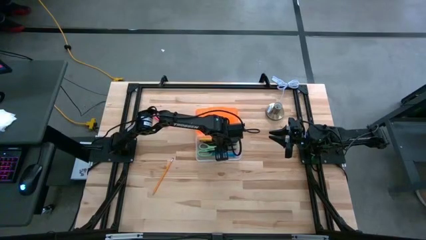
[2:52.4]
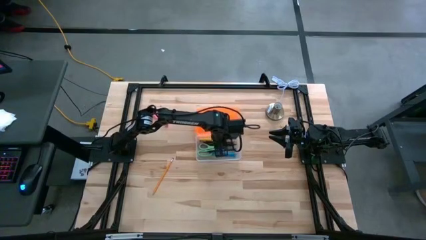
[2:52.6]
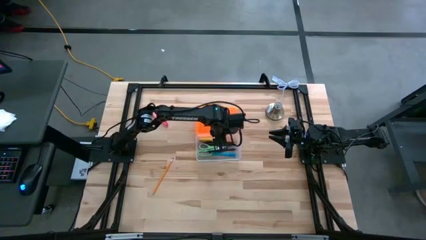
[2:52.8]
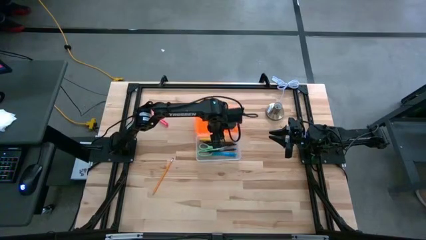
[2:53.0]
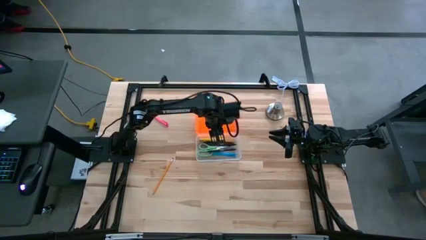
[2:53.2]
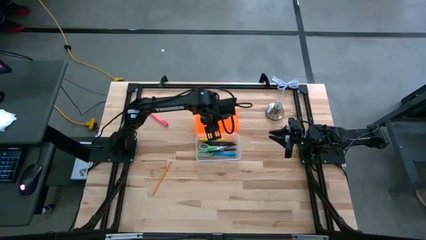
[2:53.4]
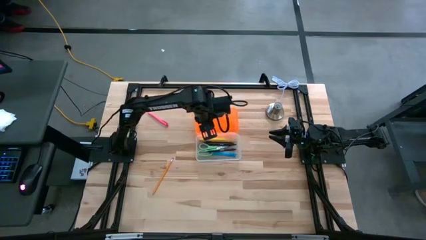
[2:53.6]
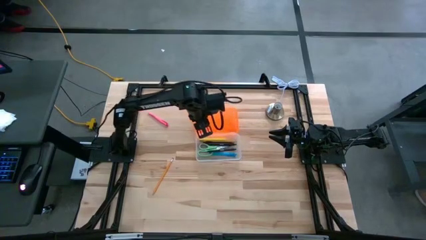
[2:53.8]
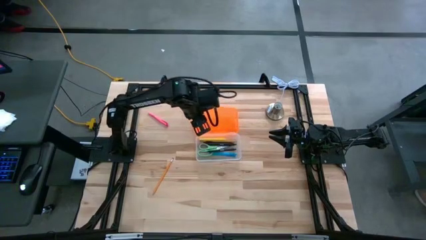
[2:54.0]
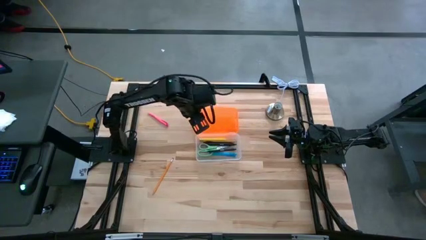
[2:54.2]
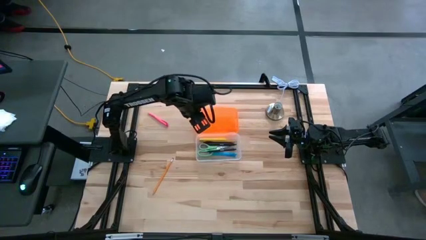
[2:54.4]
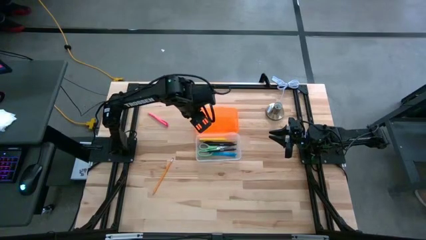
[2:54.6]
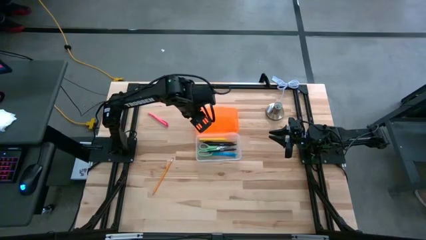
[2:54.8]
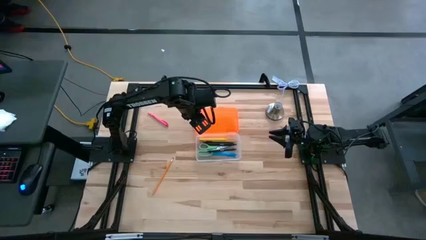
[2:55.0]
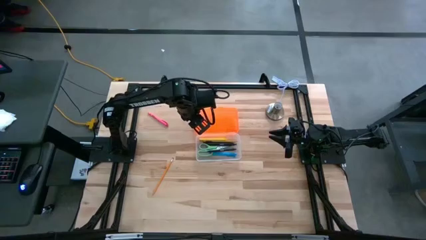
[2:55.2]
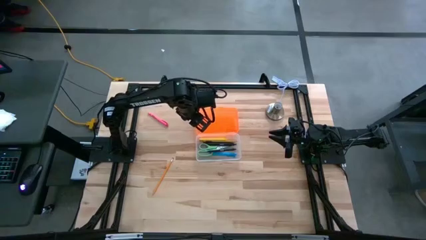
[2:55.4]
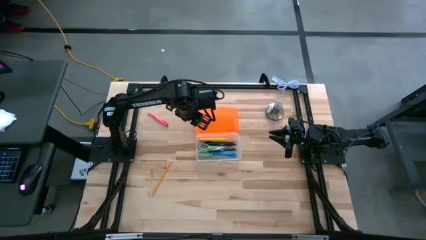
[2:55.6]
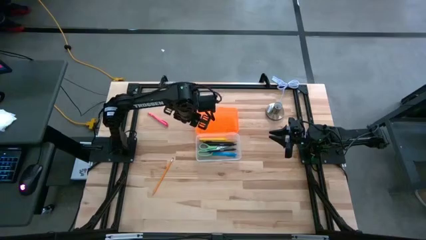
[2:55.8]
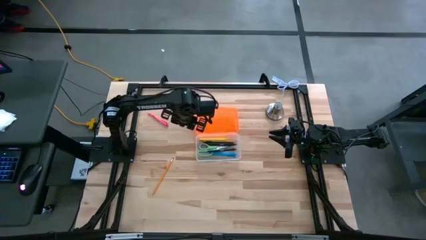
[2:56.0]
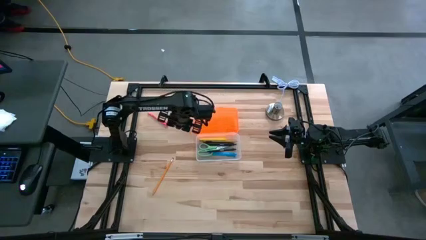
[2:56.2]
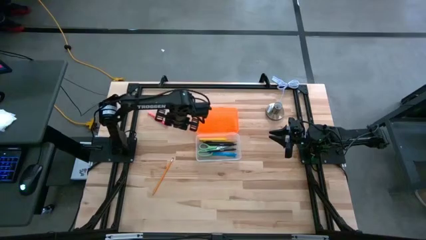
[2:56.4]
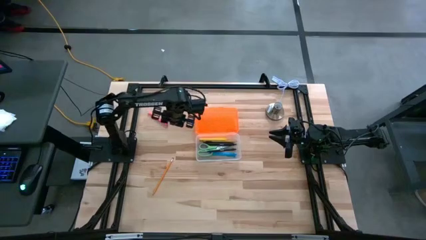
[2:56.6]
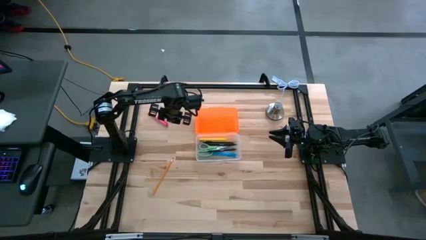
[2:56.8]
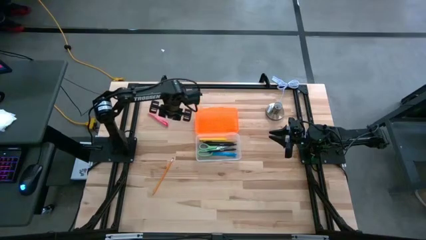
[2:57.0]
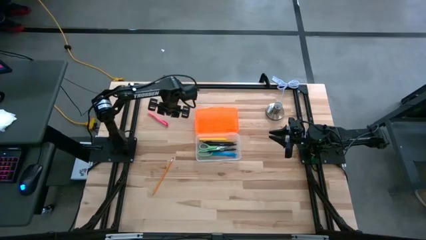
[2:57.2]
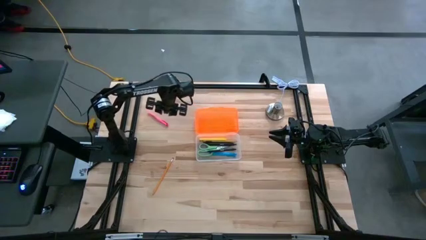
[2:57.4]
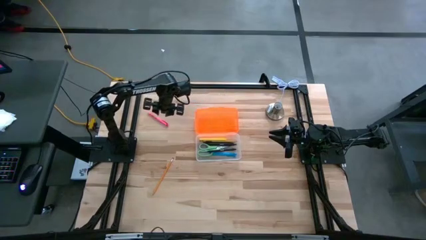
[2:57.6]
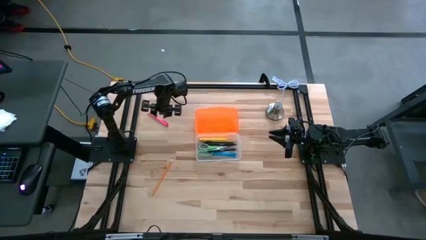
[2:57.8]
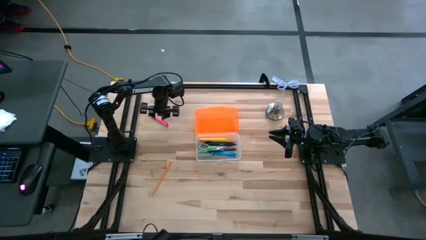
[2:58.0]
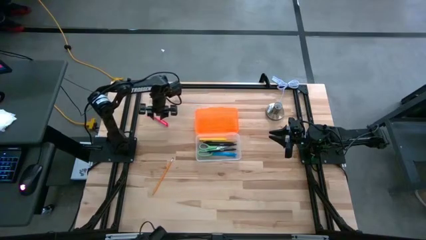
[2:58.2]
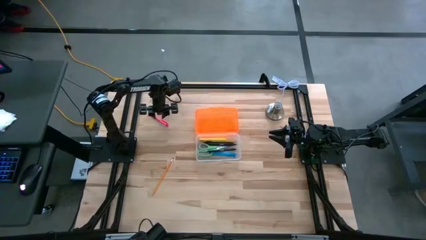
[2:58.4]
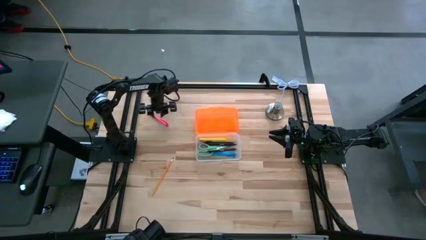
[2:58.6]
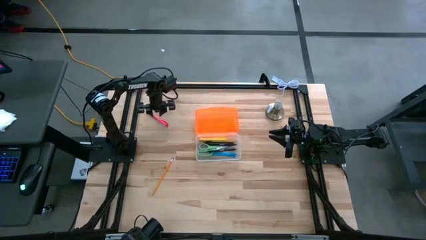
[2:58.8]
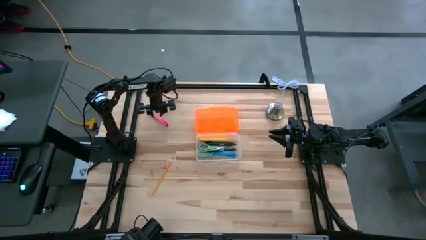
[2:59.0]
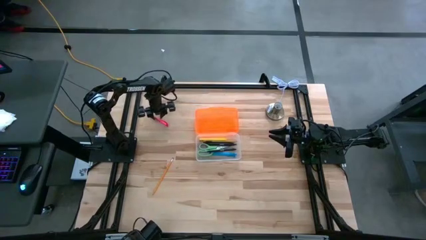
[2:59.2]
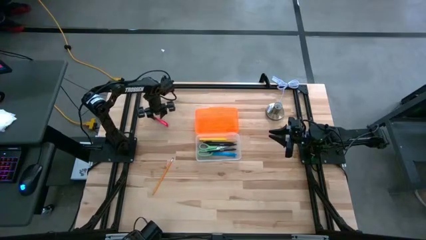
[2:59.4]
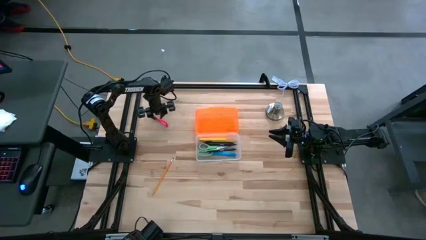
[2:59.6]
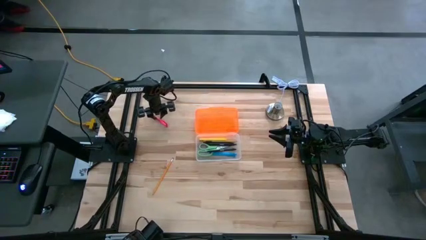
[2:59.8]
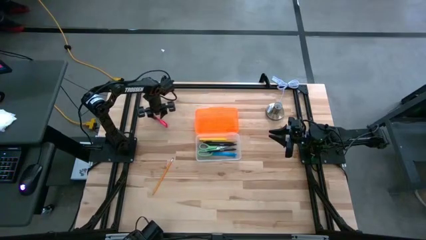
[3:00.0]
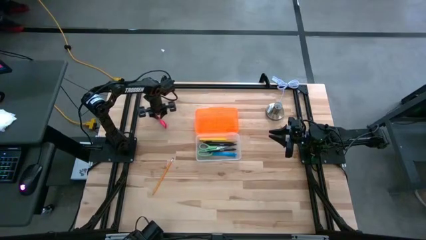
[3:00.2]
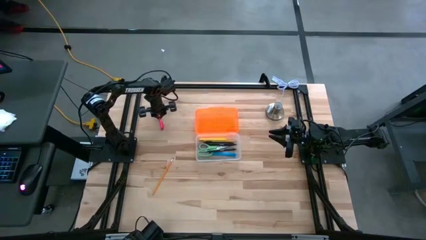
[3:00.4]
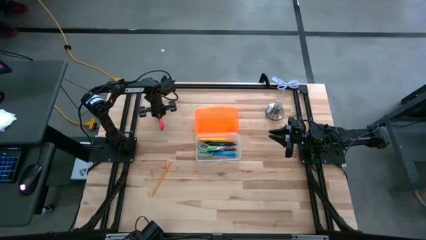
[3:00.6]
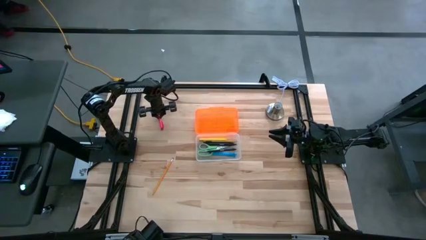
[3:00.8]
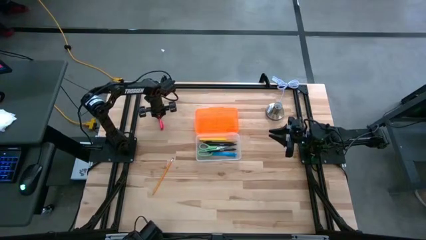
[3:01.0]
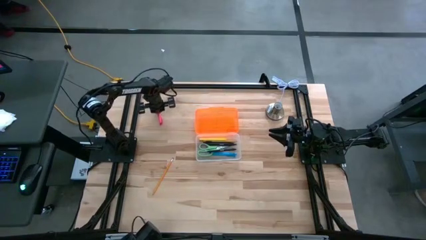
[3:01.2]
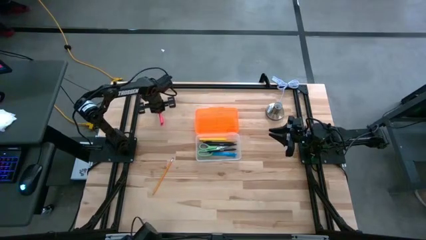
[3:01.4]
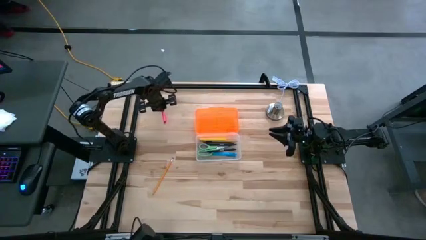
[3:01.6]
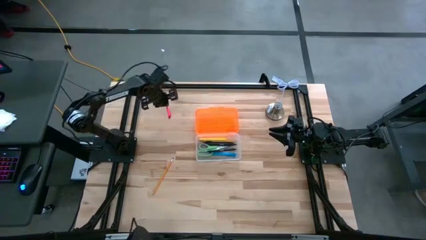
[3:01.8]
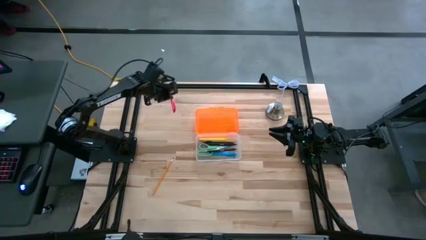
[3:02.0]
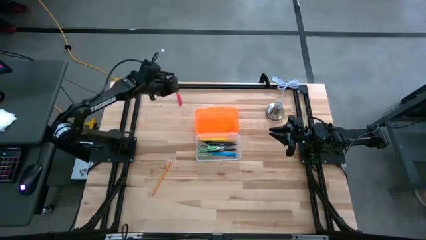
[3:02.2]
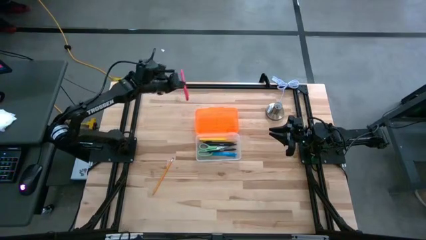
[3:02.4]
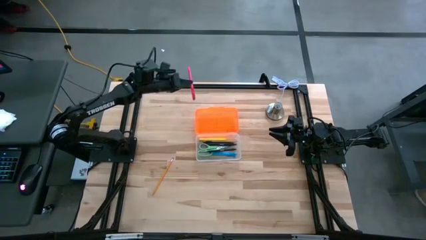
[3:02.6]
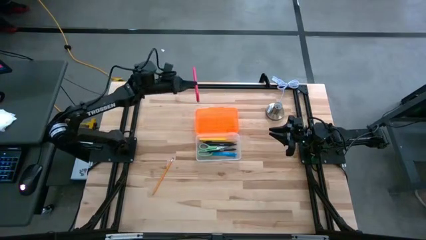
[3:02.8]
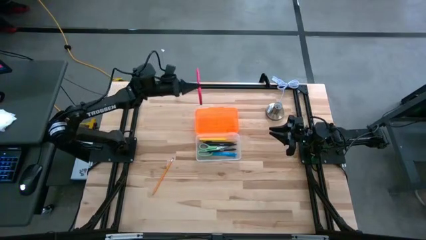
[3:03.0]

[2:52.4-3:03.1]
Task: Pick & place school supplies into a supply box
Put the pink pen into the orange supply box
